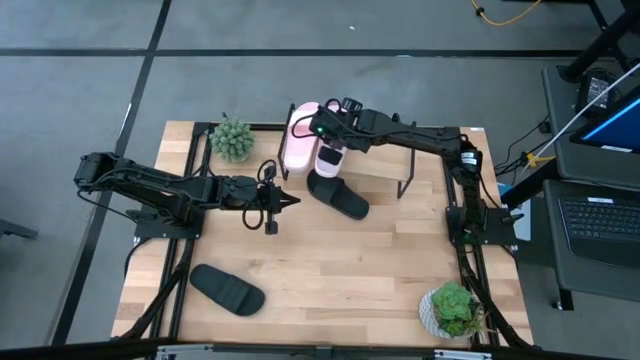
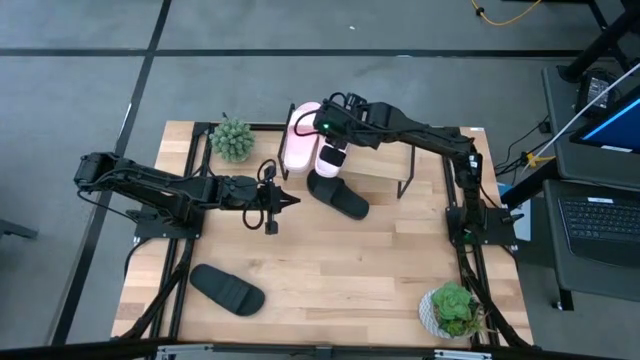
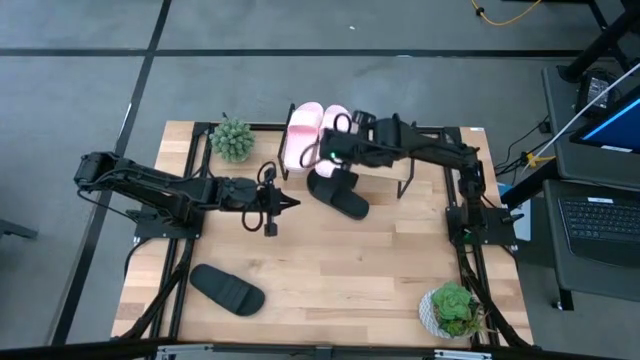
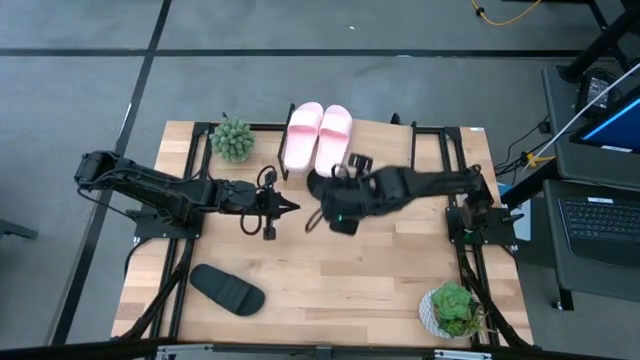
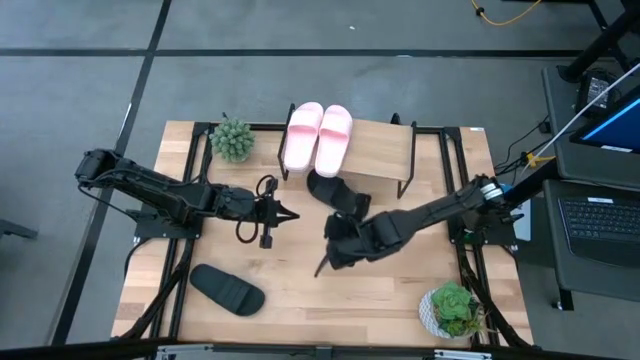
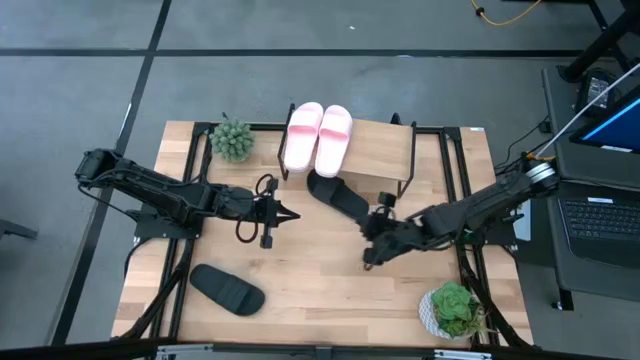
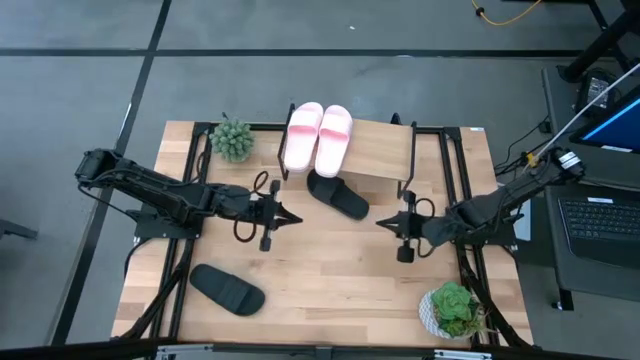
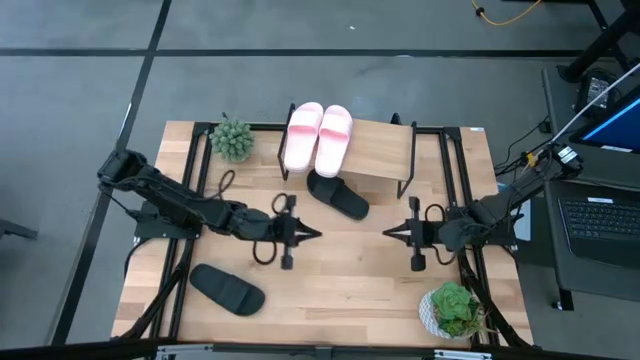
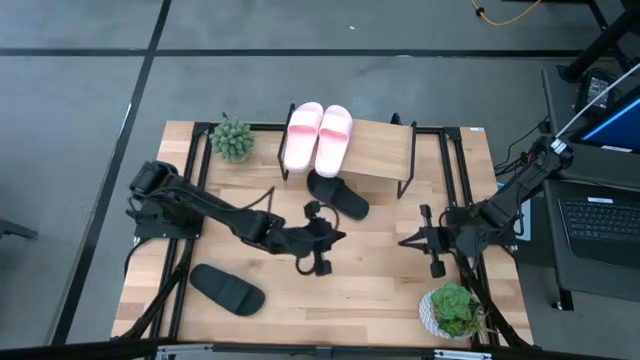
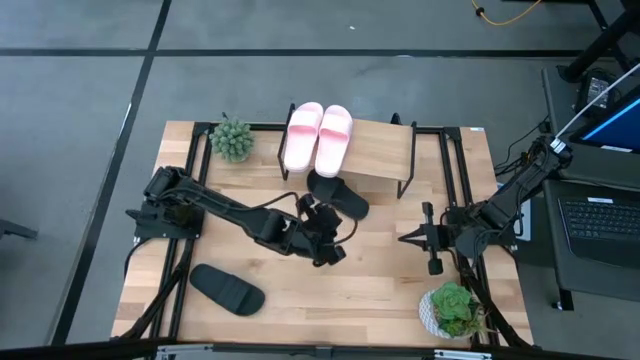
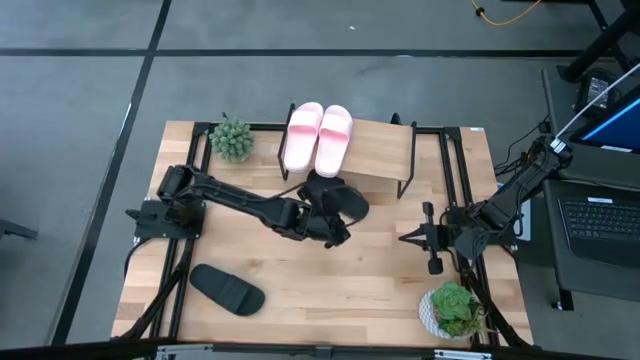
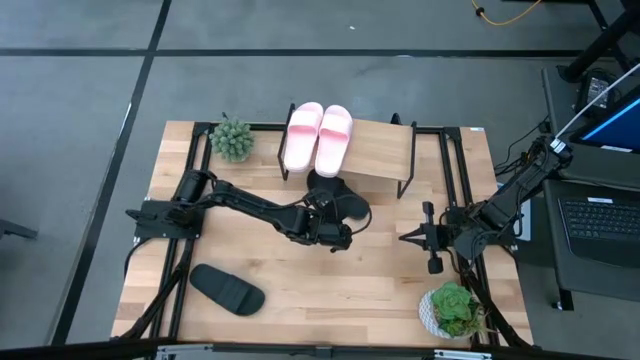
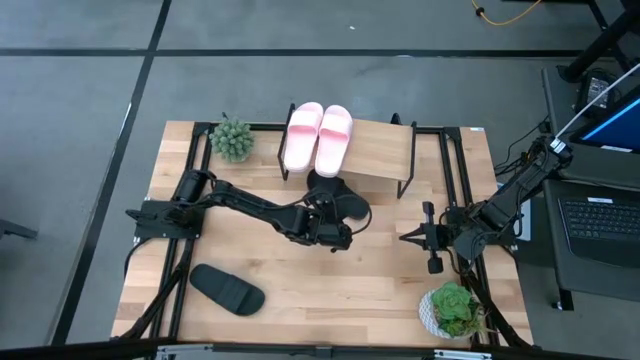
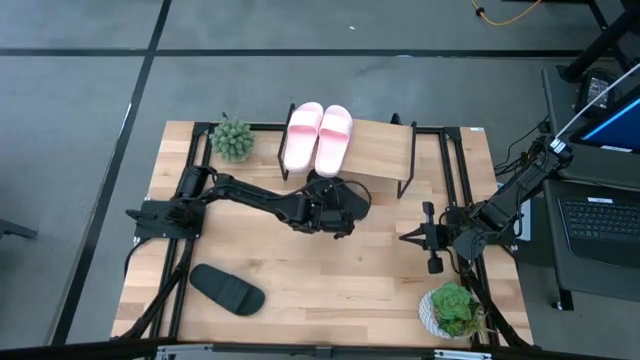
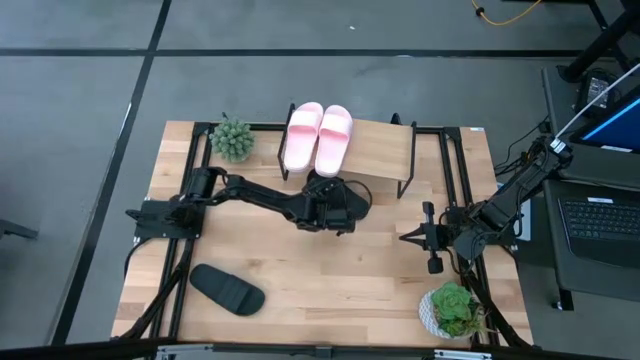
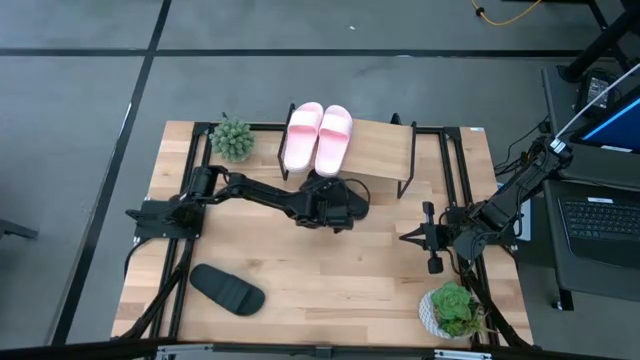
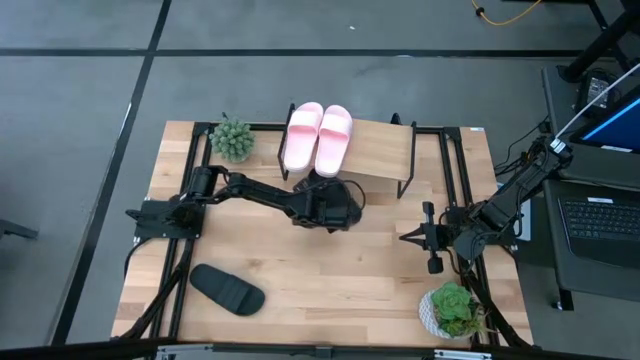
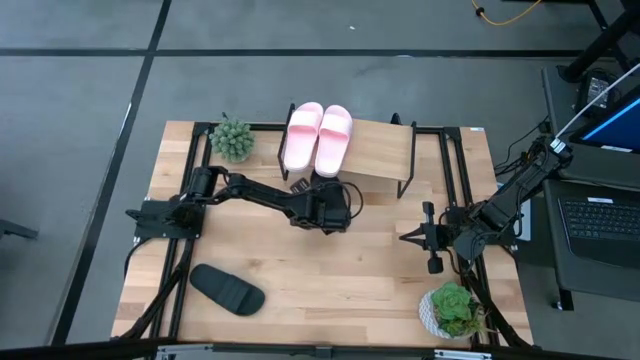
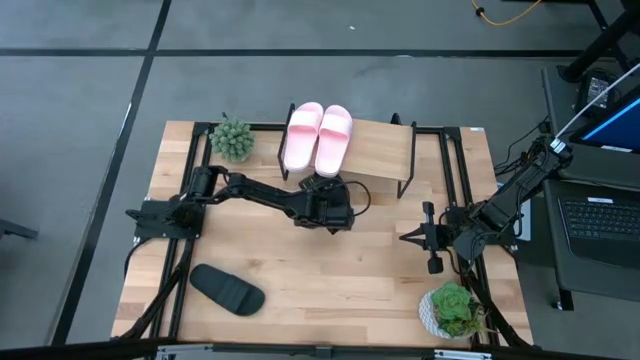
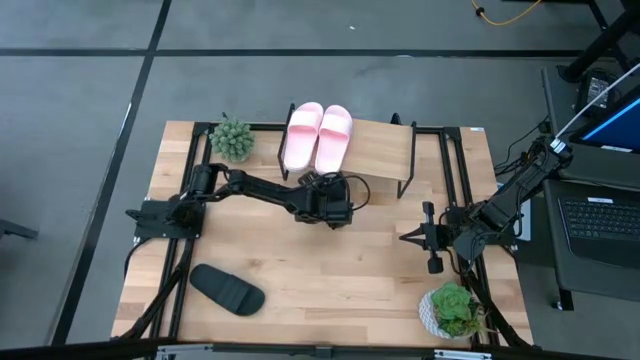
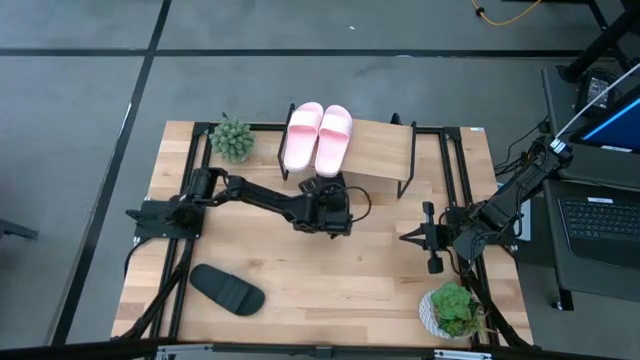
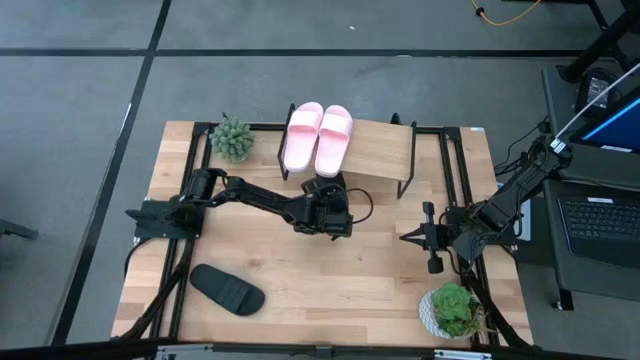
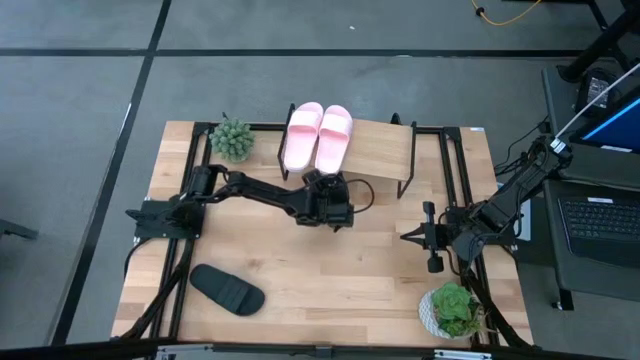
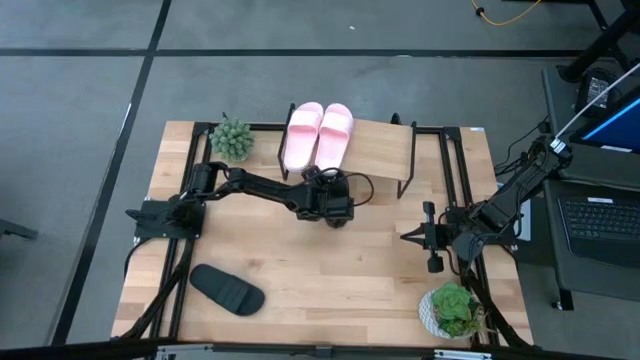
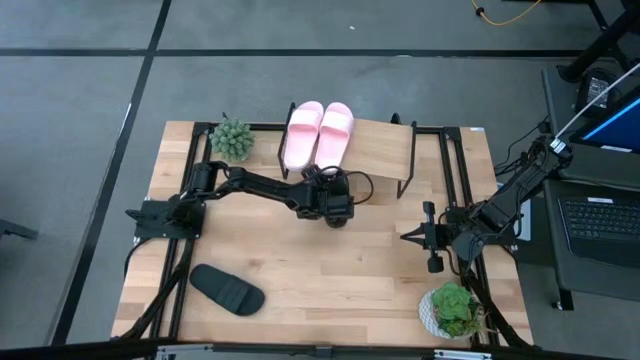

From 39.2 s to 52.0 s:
Task: Pick and place slides into the shelf
Put the top black slipper on the shelf

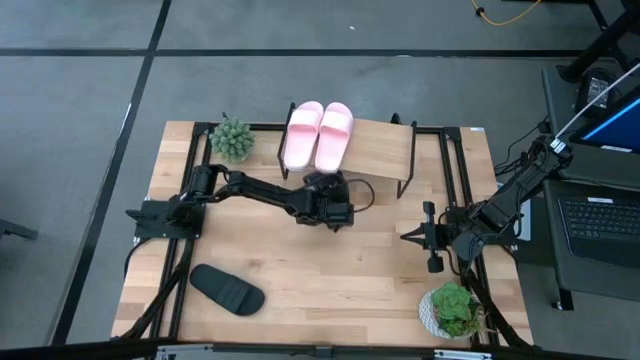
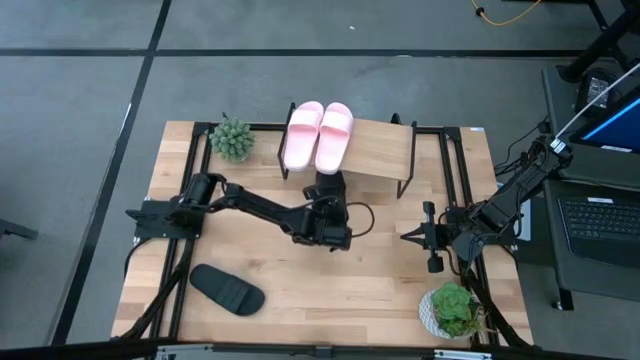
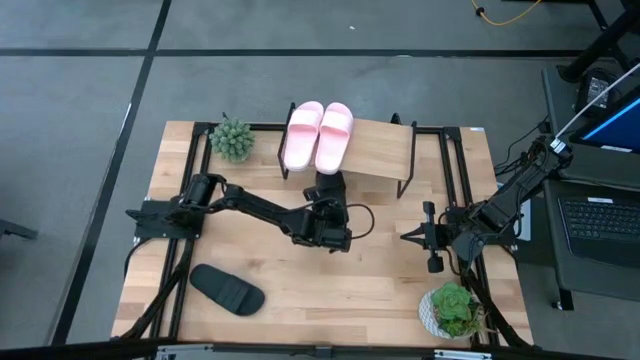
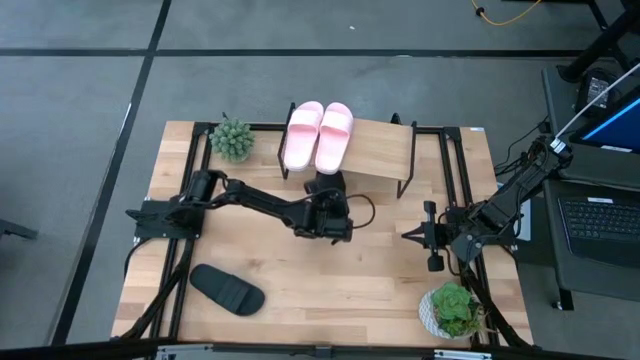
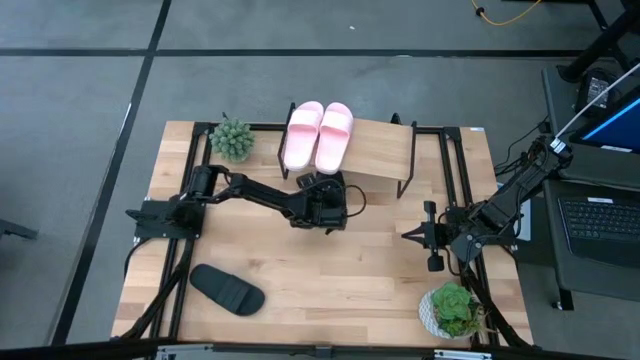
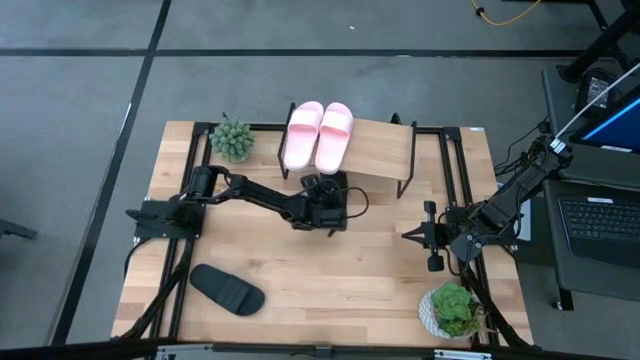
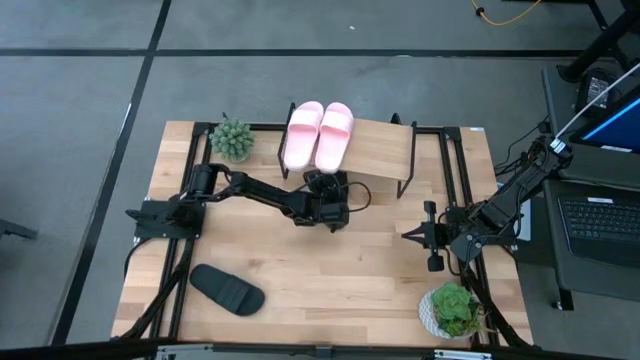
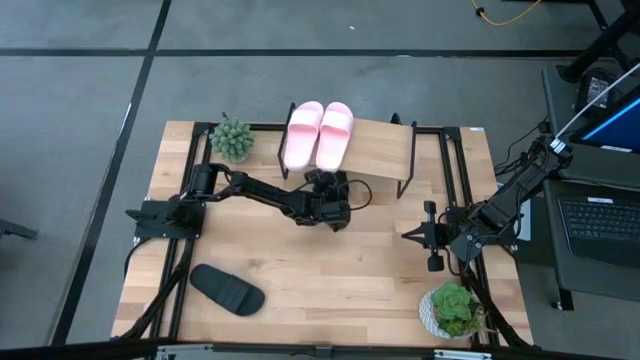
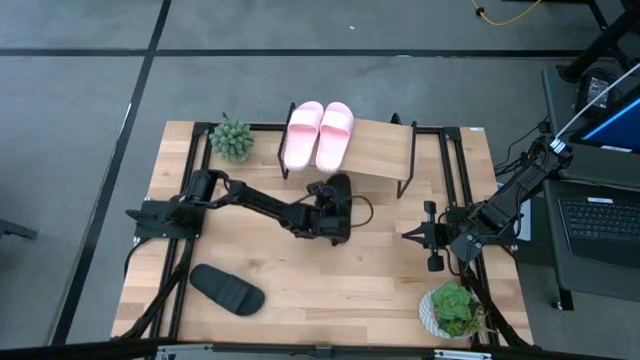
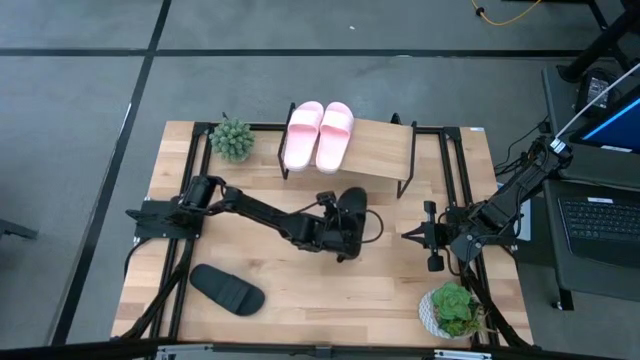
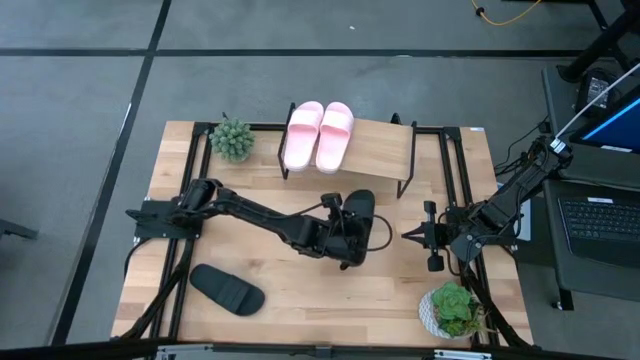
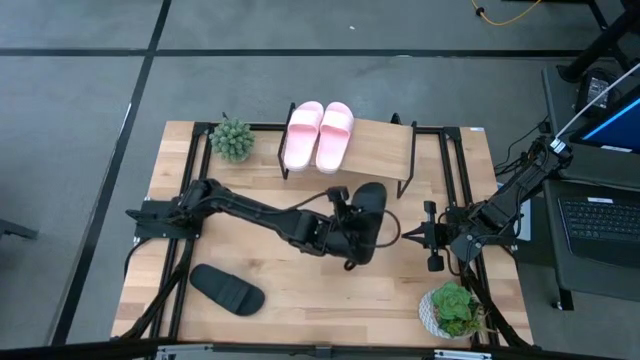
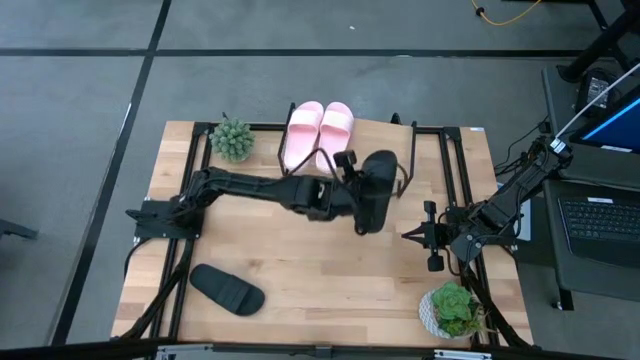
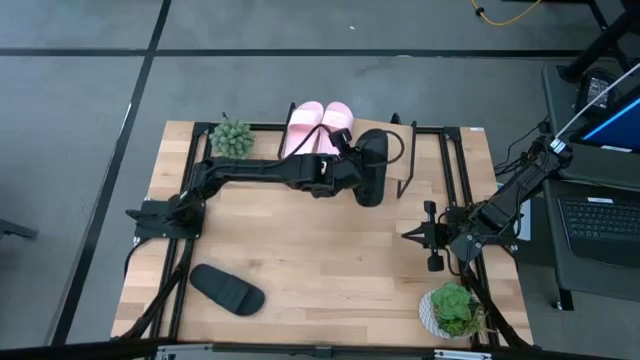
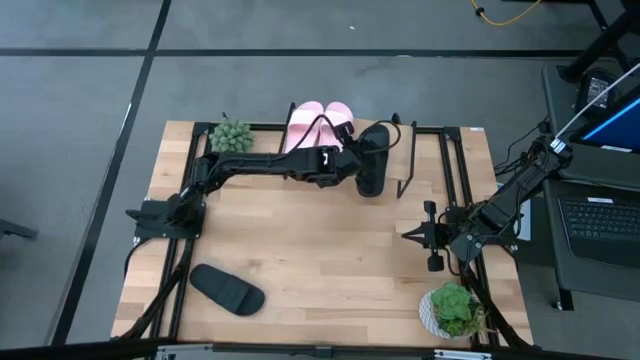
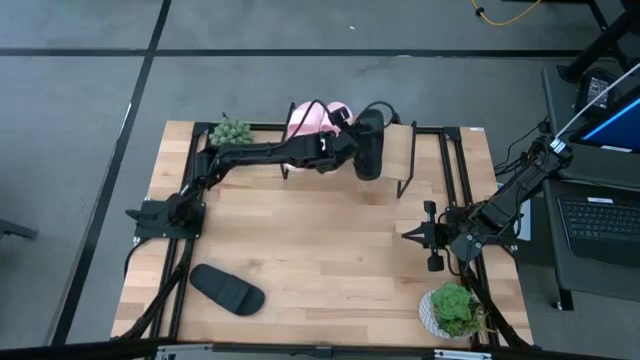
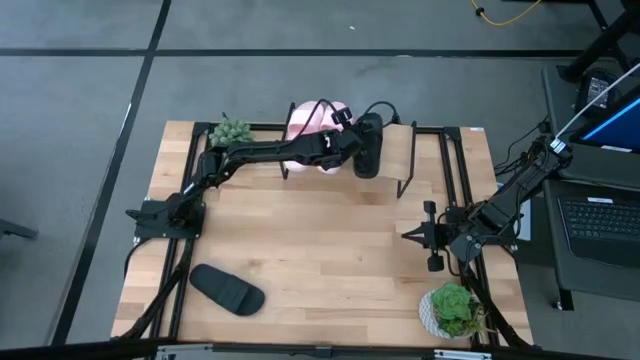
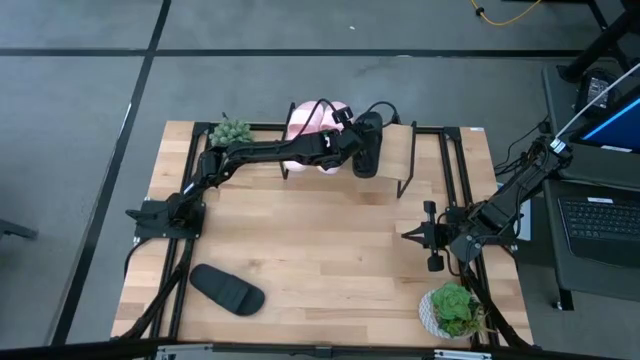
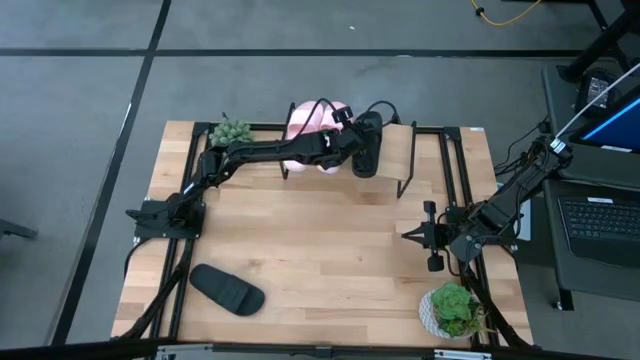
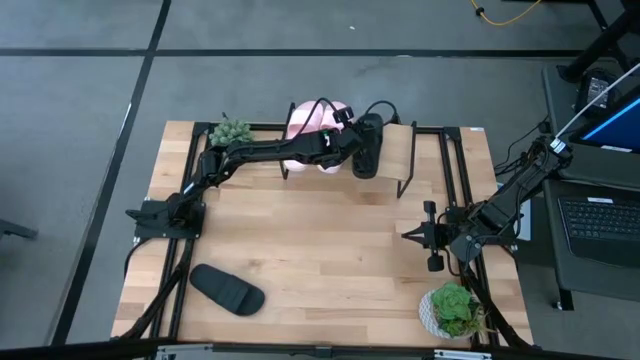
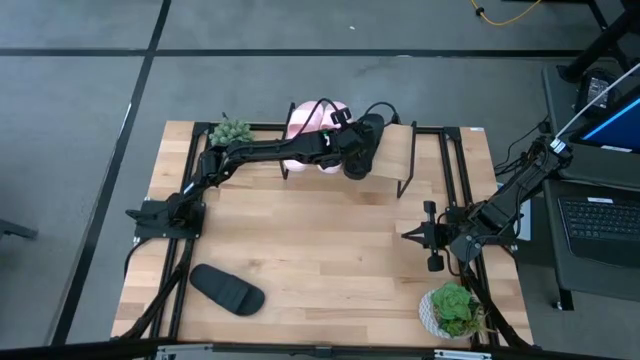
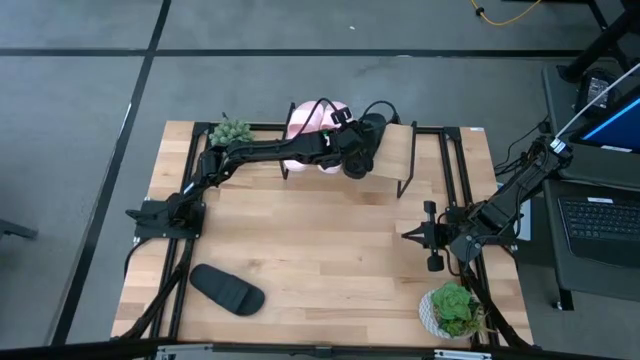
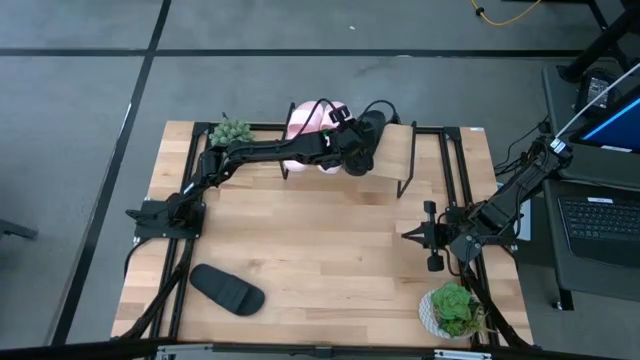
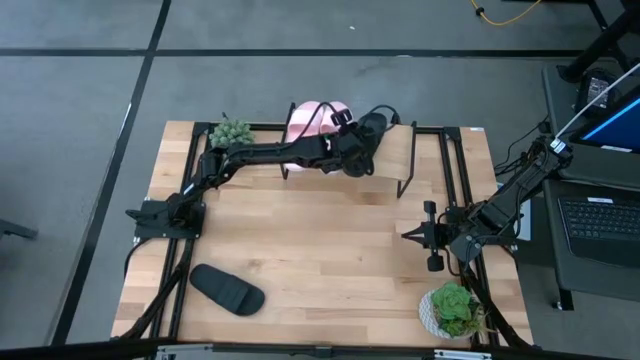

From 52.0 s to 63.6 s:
Put the top black slipper on the shelf
